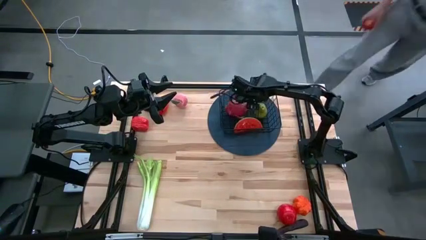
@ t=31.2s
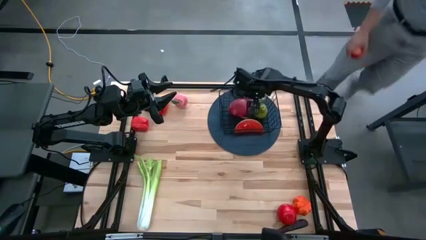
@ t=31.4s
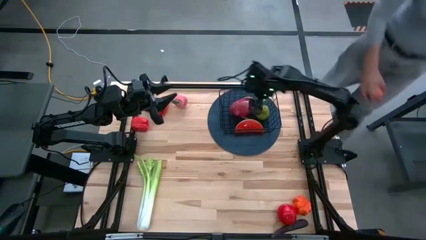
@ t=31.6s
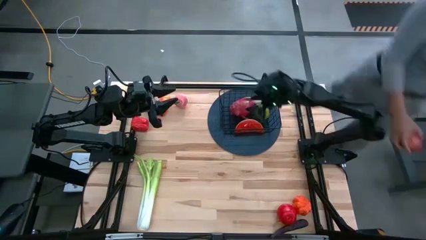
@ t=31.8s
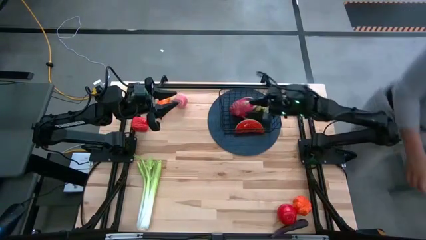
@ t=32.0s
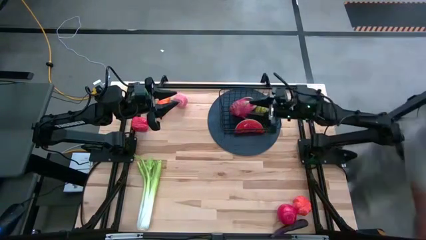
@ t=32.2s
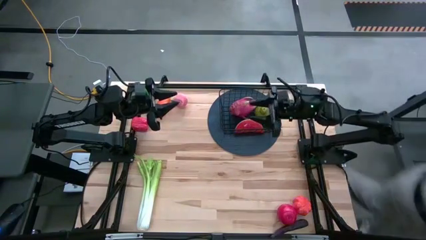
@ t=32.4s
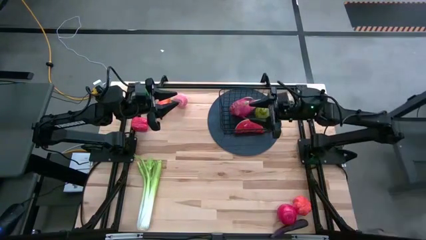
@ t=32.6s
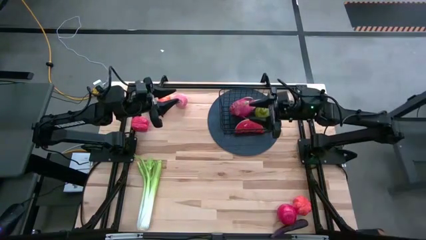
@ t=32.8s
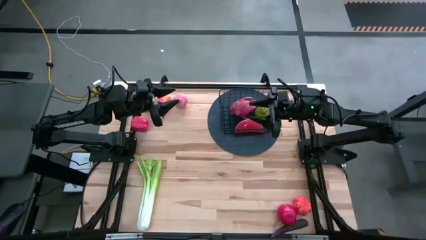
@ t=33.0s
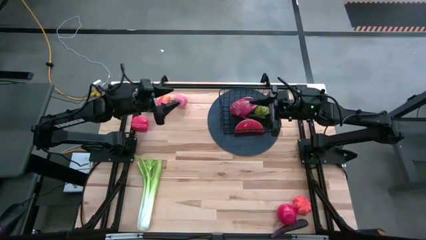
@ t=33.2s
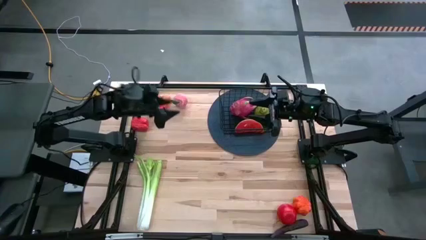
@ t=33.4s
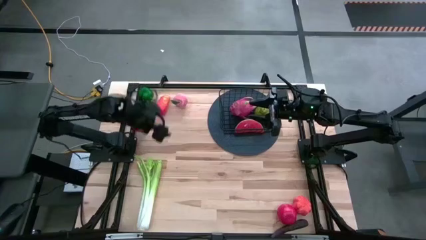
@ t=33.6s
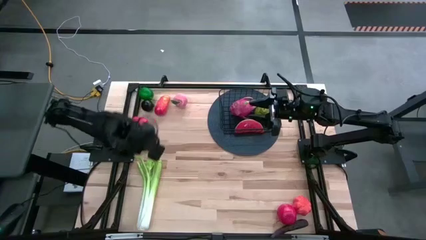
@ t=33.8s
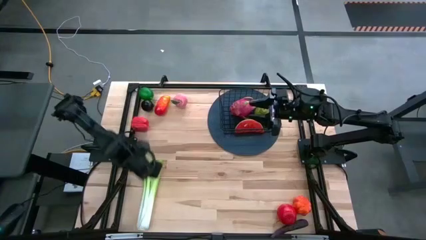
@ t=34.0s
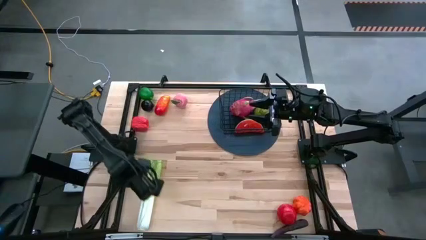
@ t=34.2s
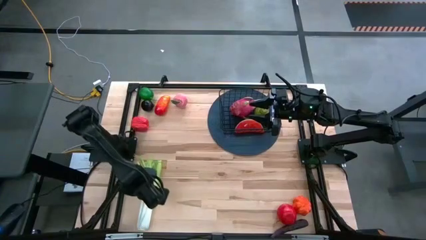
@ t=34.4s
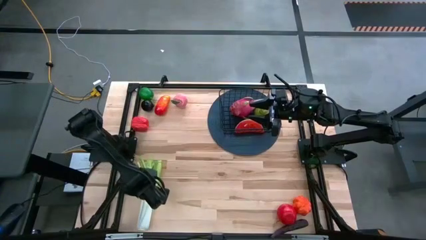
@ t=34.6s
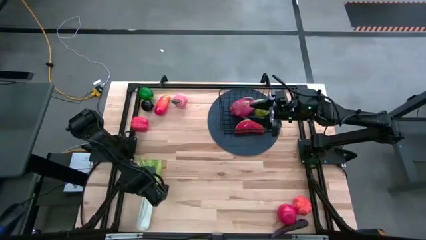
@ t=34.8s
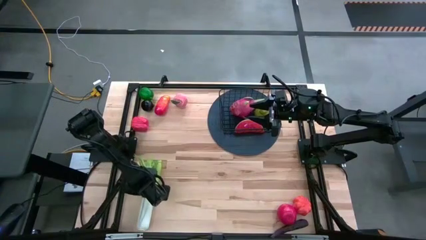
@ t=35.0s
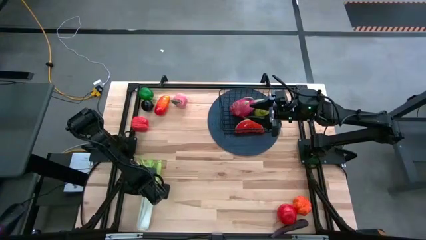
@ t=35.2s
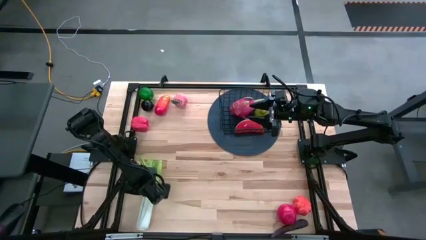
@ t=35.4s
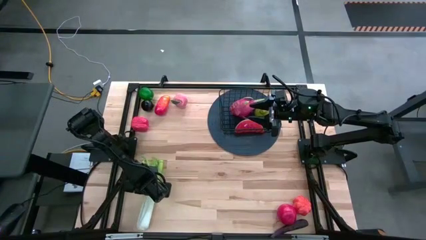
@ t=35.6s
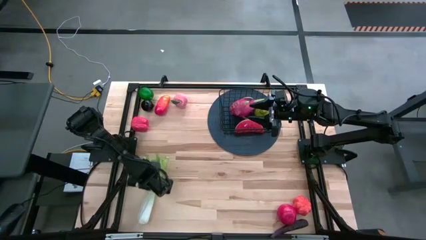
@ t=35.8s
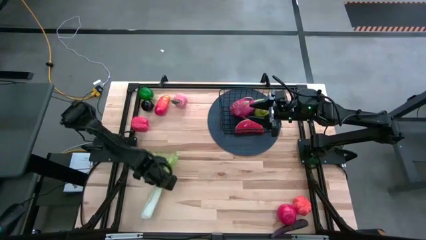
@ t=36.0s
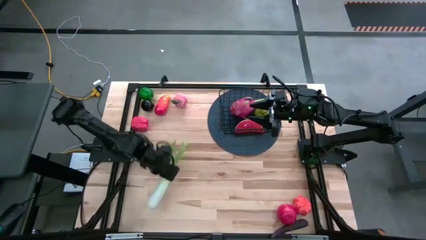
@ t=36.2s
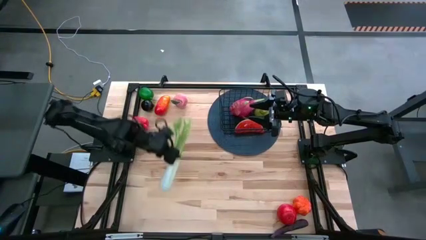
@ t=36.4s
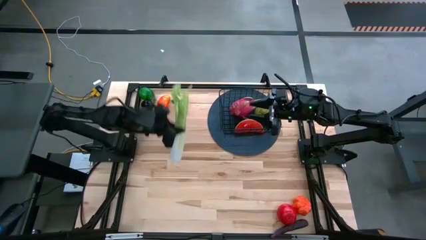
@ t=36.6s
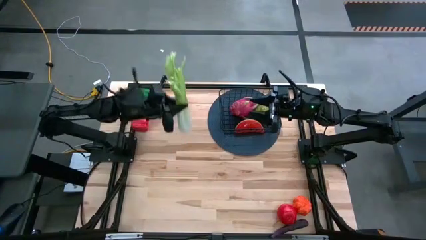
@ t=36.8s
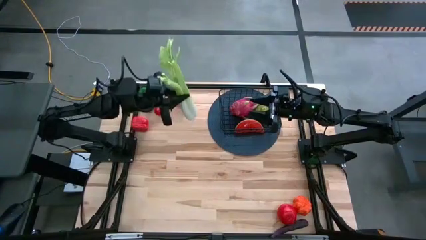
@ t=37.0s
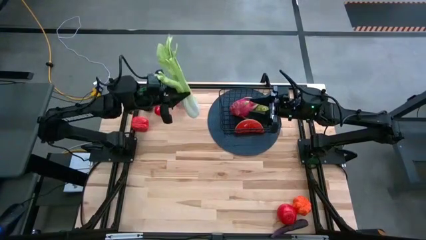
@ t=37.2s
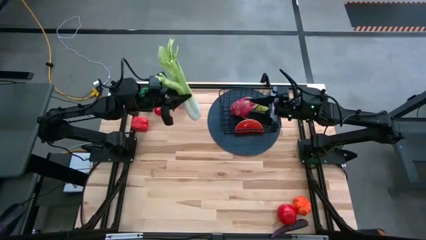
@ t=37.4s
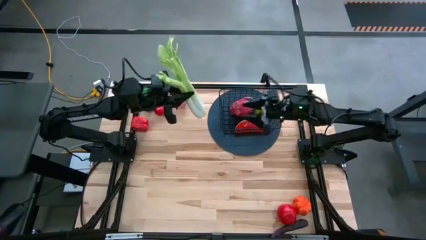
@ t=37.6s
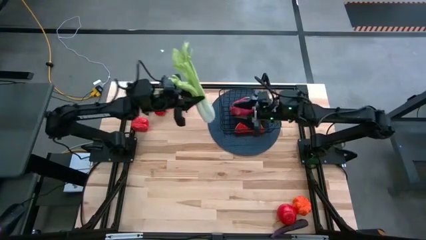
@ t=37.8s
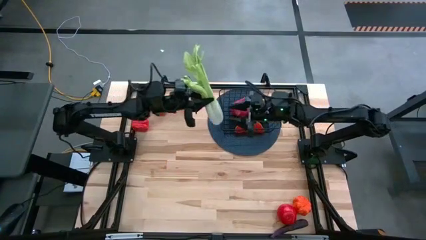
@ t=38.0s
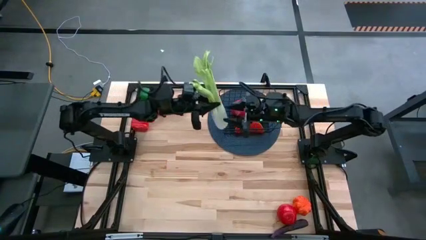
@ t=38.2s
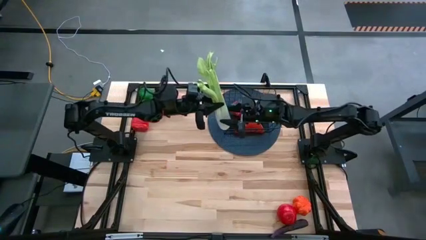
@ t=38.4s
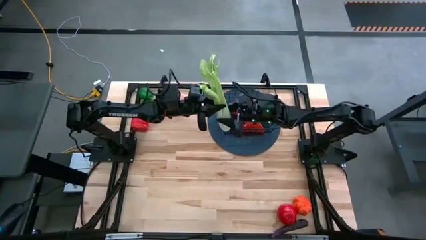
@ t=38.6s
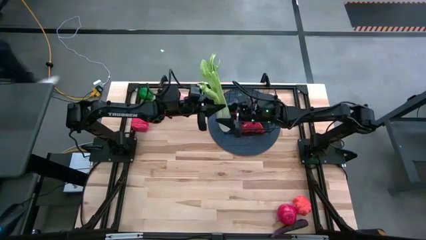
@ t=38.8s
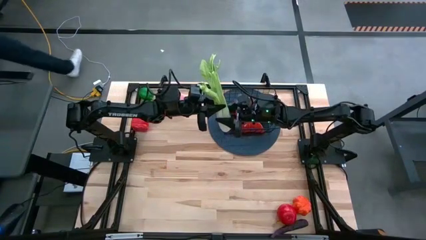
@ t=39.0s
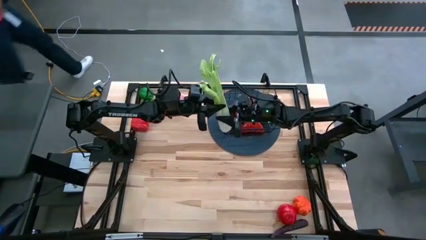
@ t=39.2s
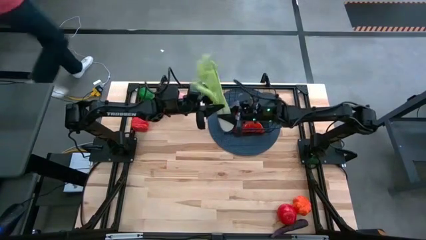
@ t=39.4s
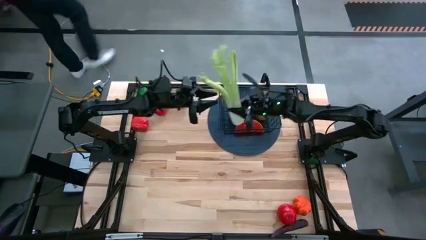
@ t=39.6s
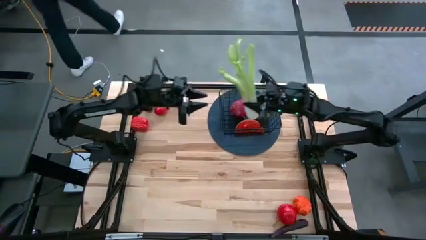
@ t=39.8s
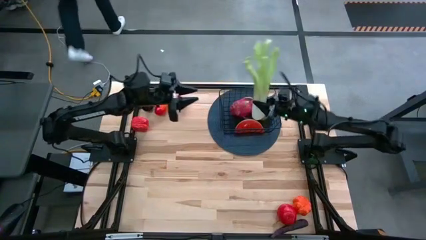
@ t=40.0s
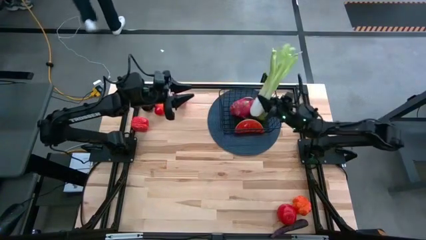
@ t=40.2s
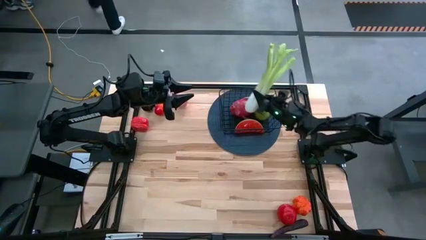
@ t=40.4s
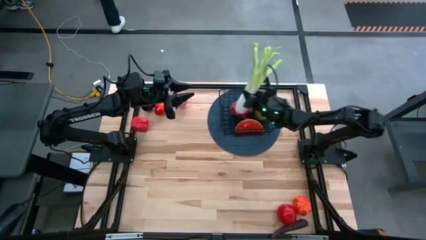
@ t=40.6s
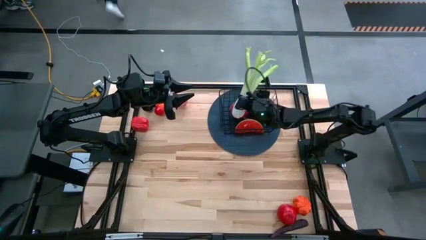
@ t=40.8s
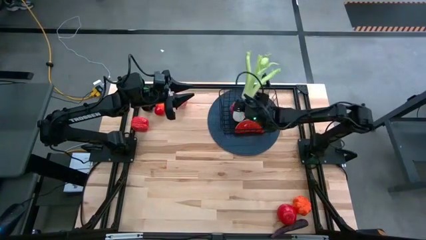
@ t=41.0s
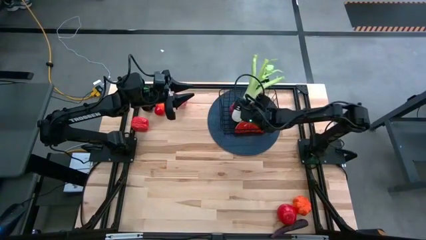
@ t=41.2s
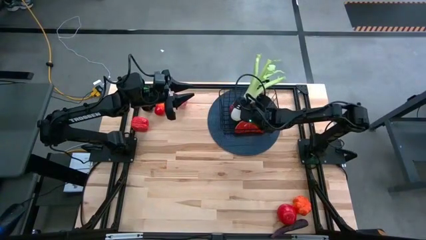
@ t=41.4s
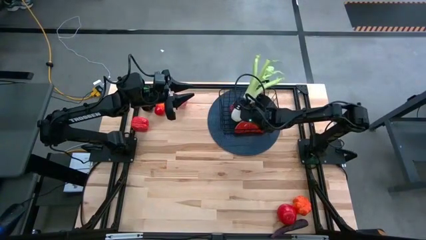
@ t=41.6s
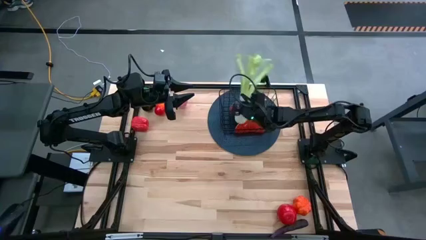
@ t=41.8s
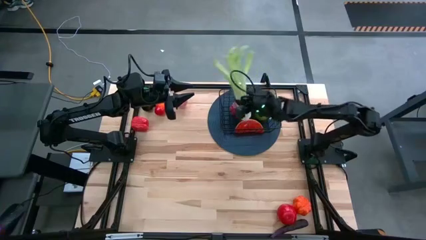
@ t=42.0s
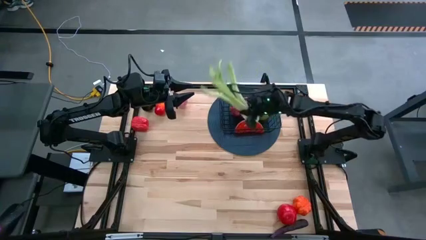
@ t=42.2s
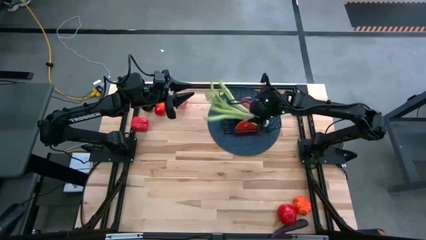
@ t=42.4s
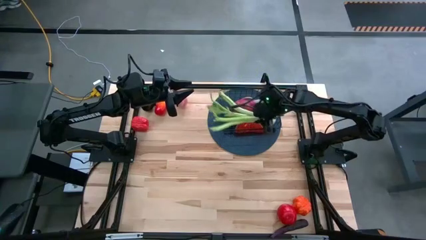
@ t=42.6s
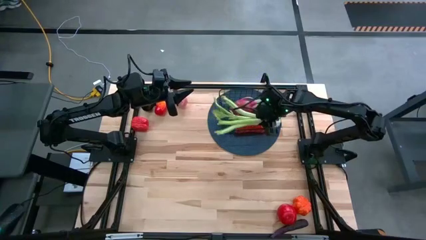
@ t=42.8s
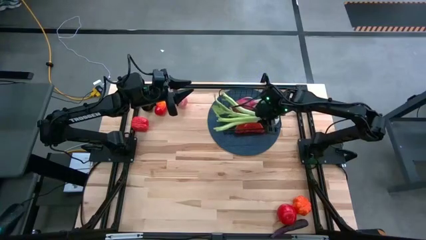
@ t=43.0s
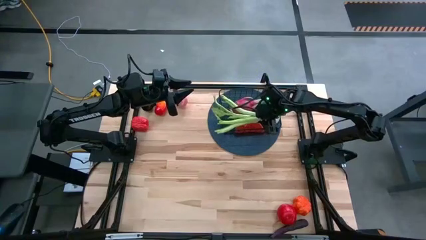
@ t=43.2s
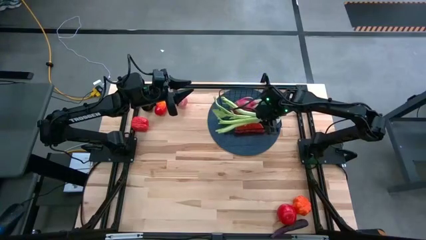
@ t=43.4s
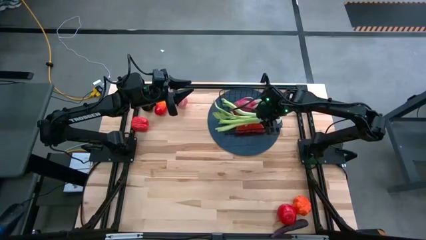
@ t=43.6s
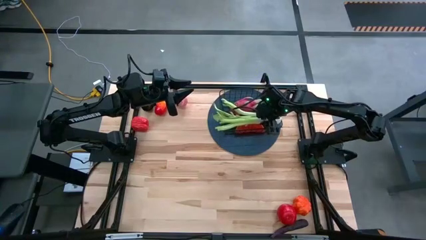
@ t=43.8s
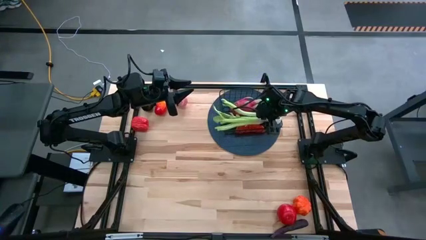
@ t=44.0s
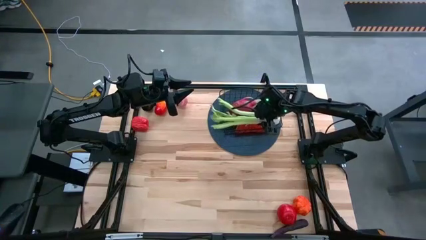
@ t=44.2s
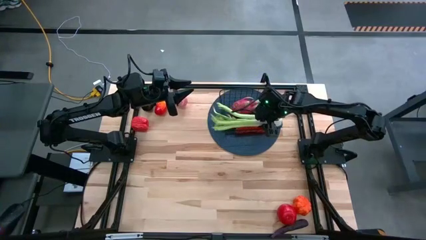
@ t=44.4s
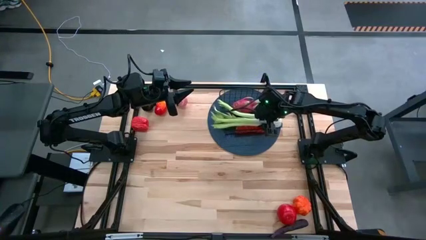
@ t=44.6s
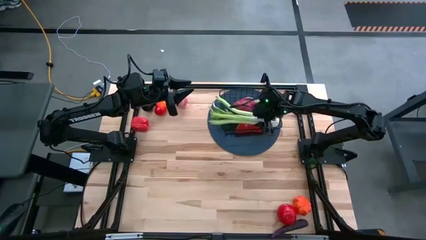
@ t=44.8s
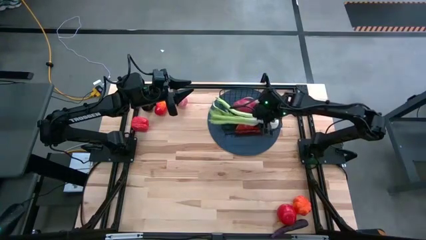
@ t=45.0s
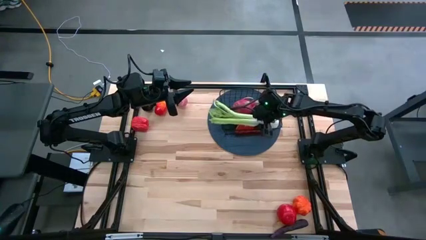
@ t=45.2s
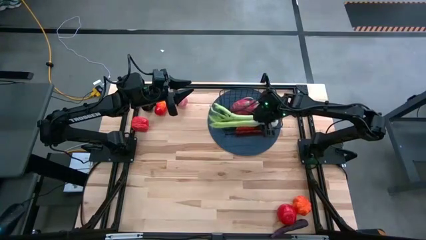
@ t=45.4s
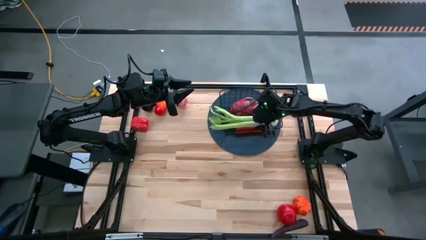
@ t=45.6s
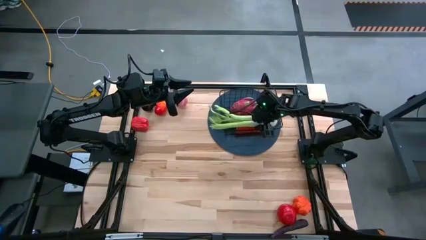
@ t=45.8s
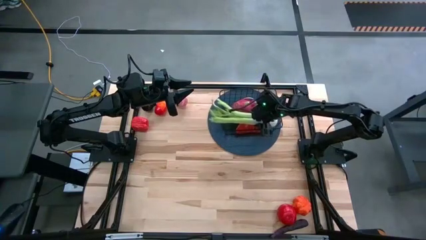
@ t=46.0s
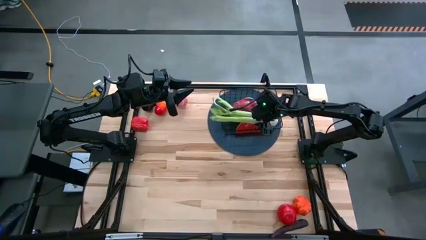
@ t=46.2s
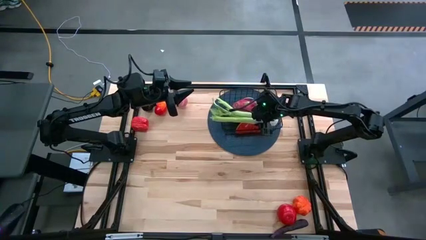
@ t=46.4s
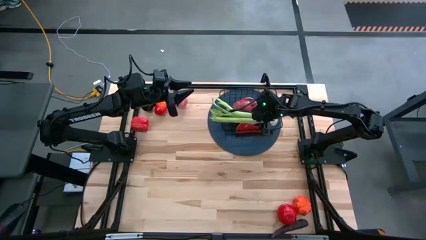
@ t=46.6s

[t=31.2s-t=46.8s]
Task: Build produce basket
Put the celery into the black wire basket
